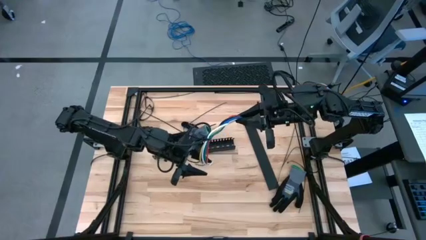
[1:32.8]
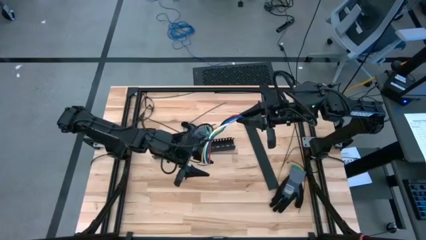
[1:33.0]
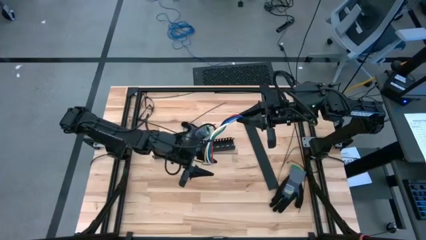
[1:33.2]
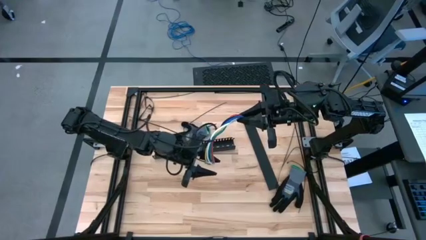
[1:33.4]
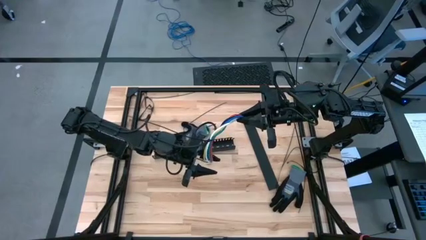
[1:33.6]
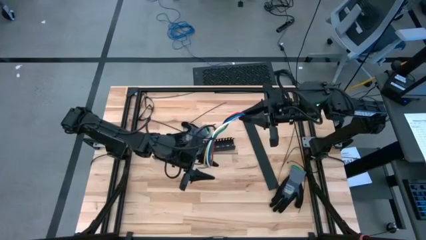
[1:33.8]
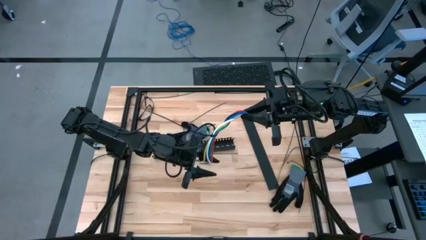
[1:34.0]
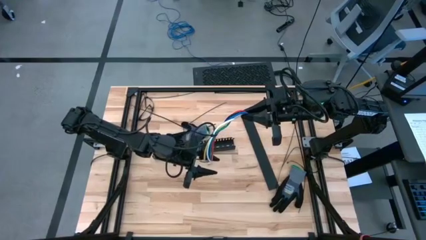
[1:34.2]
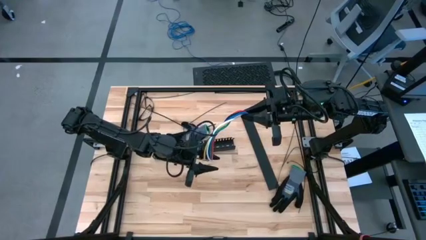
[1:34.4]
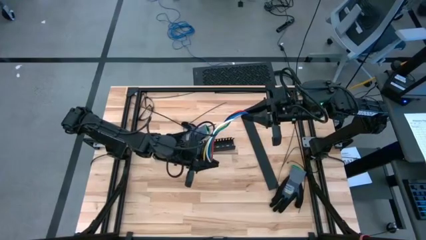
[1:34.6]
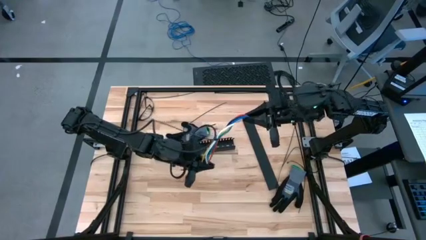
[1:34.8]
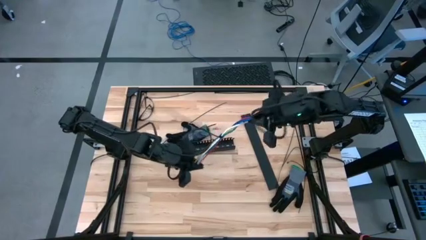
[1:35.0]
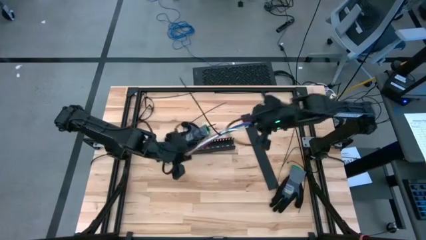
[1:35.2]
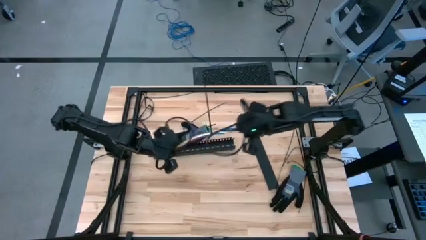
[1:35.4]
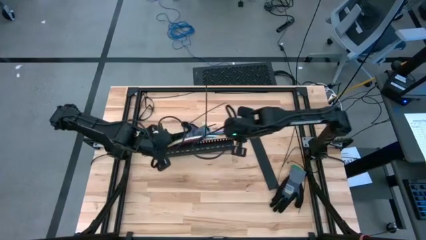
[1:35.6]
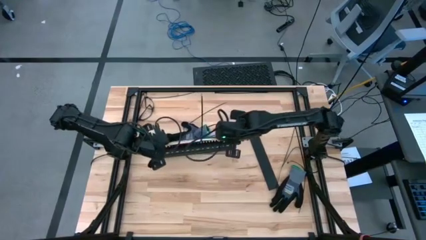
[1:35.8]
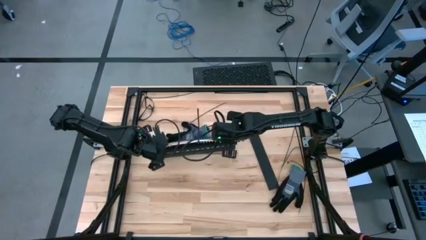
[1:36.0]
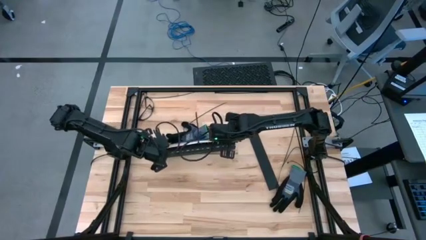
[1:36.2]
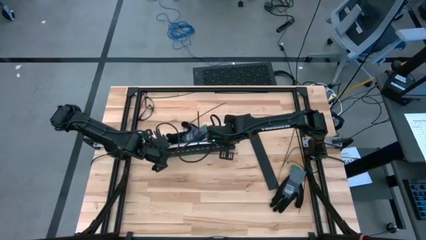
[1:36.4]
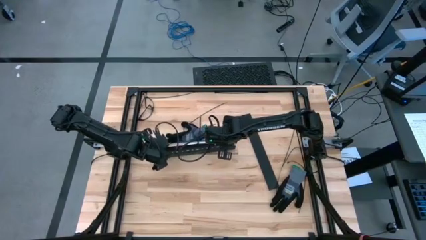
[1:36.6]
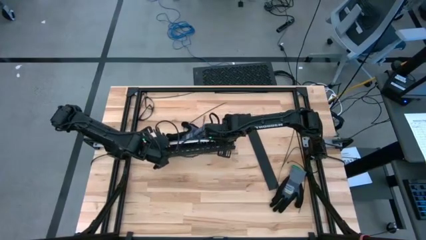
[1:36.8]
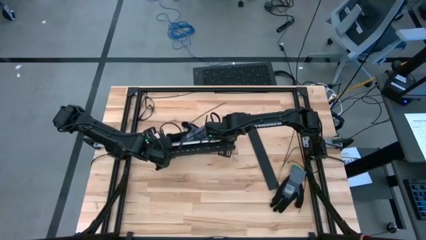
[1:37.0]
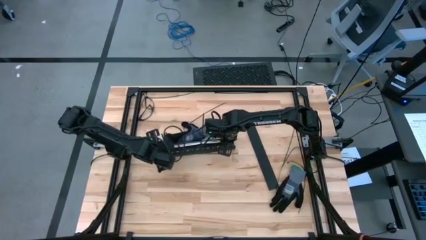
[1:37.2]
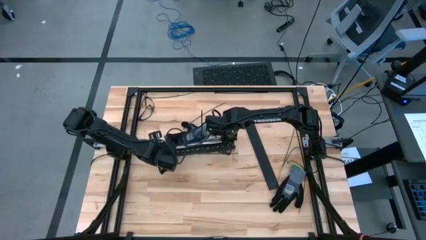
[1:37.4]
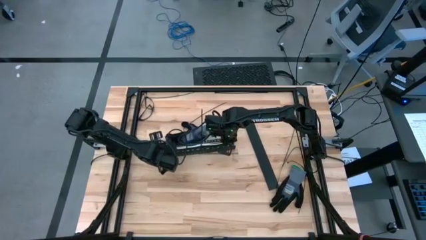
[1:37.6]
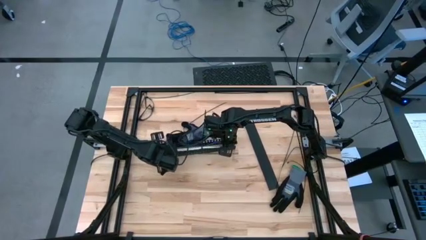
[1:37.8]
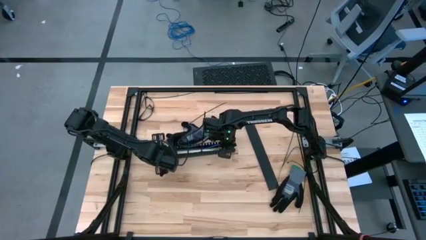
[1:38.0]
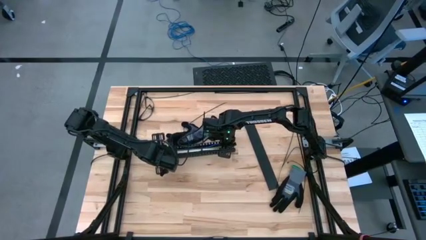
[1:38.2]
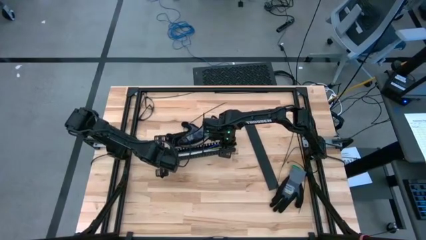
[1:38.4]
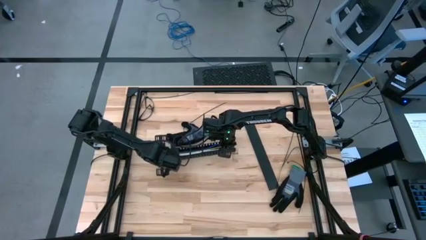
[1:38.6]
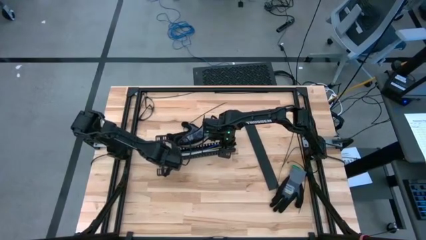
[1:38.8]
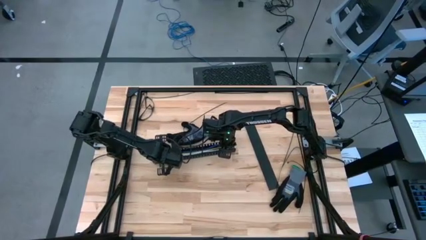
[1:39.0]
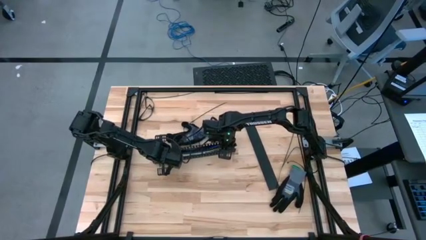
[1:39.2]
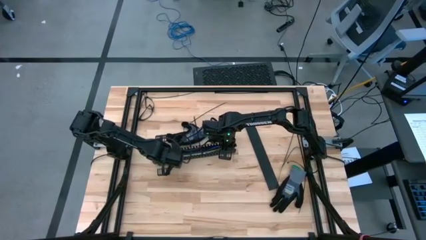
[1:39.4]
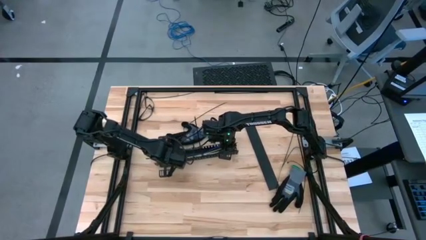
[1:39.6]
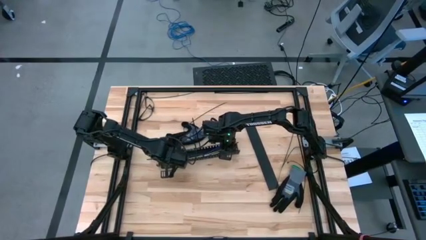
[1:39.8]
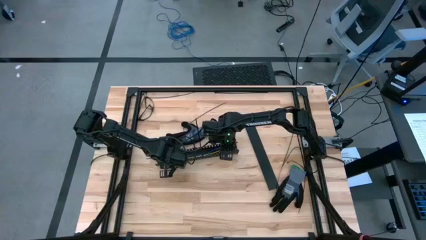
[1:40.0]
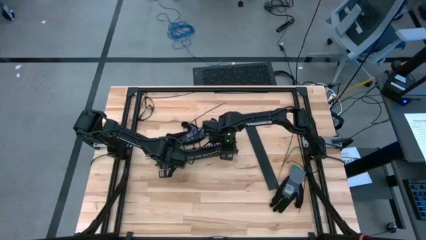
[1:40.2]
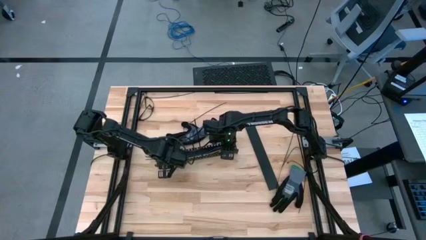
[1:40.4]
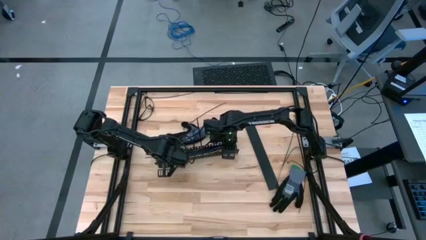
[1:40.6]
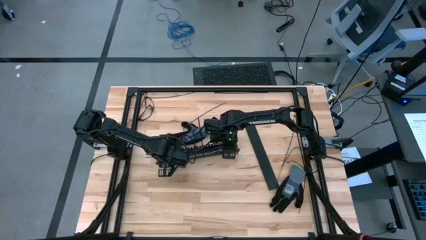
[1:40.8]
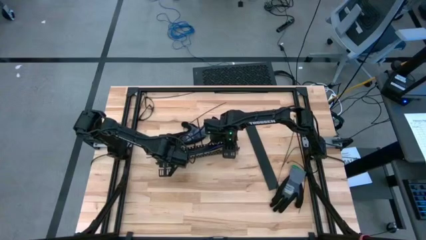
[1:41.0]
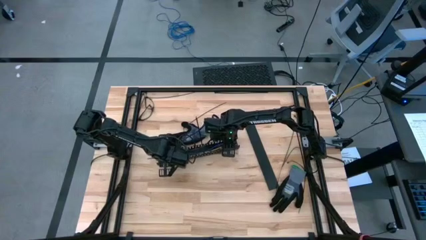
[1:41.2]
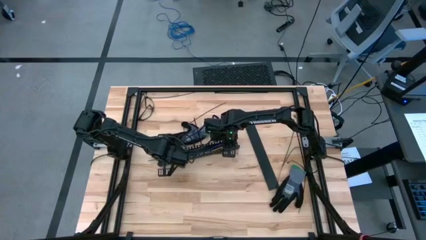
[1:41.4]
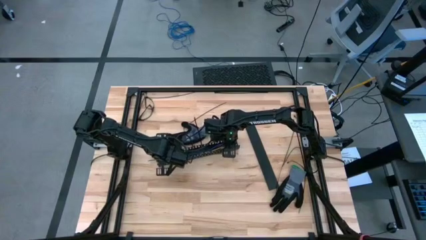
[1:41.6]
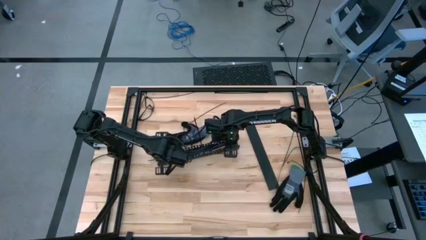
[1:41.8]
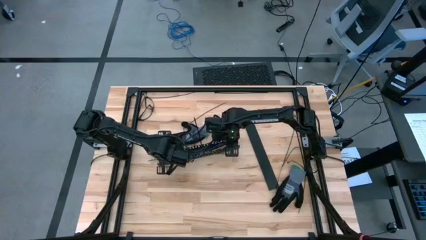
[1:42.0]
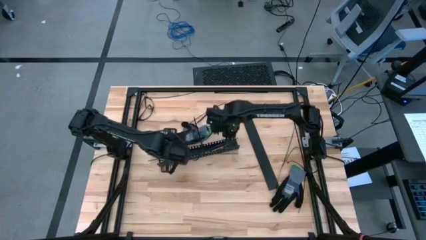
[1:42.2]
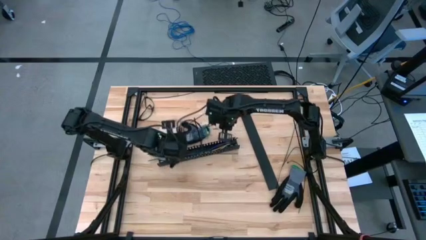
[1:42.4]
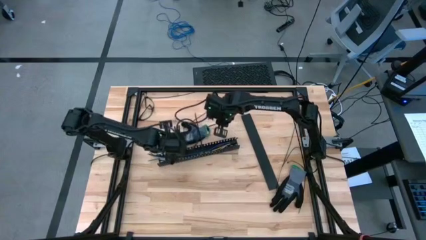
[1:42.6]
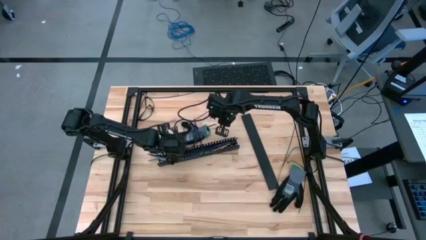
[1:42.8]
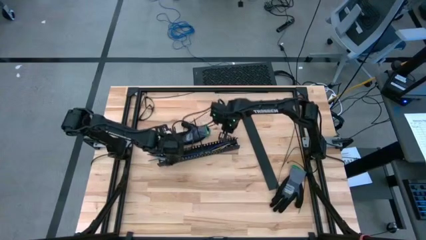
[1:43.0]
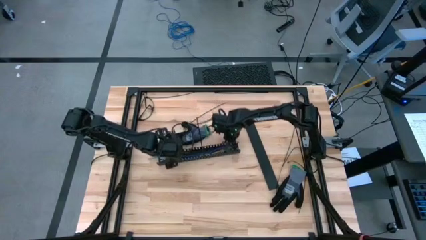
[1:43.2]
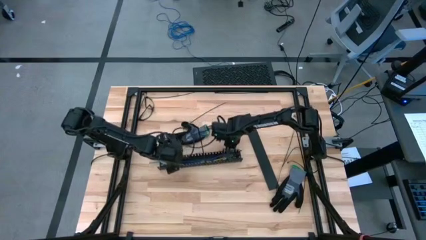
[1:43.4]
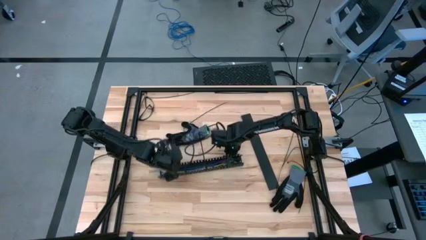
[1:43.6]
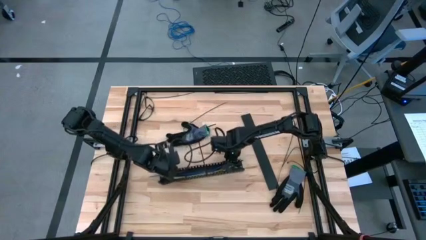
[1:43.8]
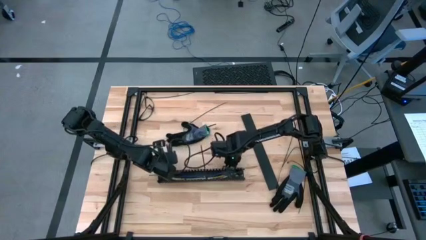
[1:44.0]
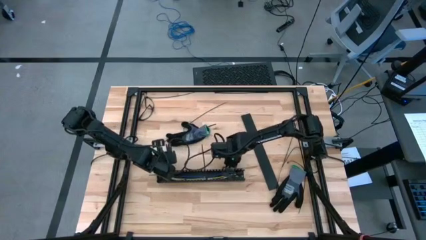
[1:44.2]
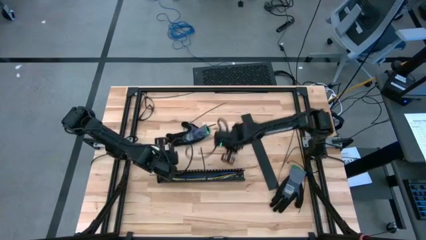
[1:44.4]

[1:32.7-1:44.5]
Task: Ziptie cables
Put the cable wires into the black cable duct

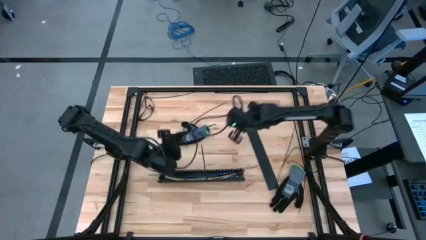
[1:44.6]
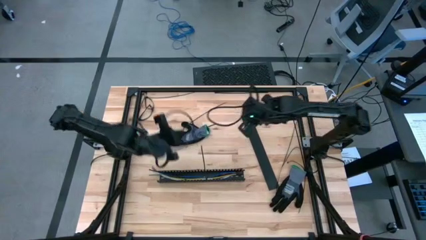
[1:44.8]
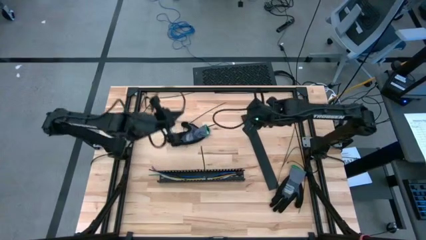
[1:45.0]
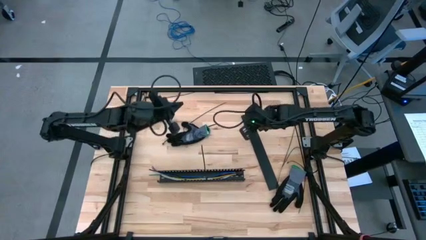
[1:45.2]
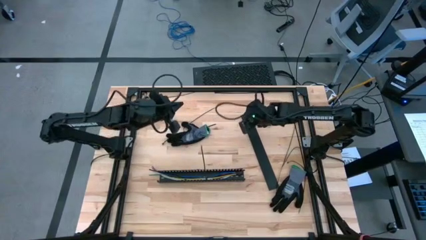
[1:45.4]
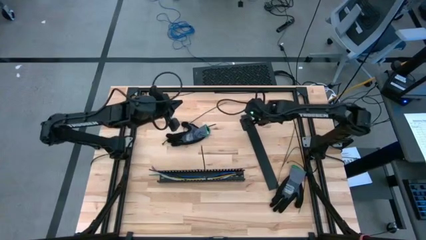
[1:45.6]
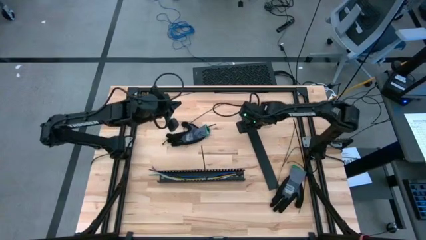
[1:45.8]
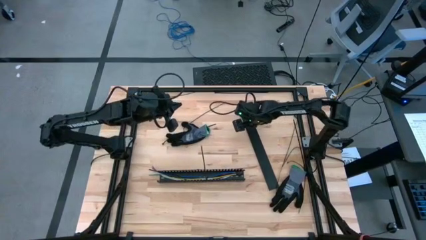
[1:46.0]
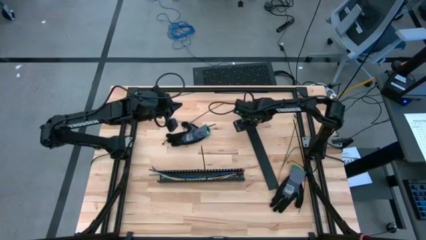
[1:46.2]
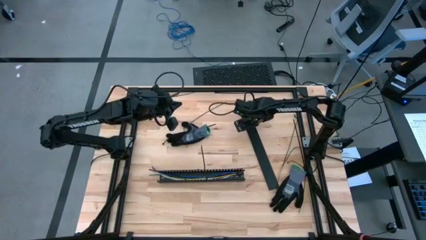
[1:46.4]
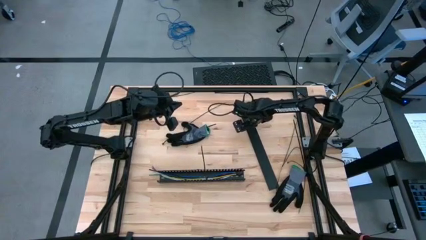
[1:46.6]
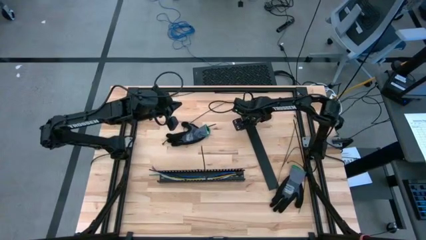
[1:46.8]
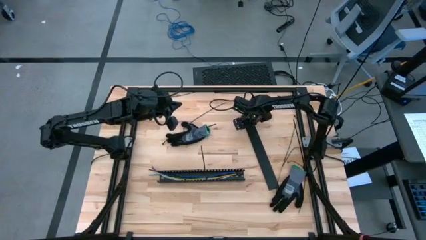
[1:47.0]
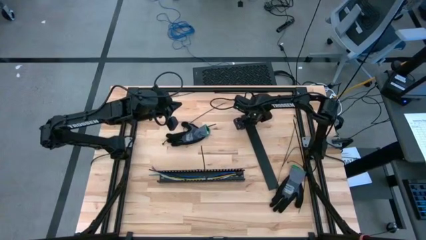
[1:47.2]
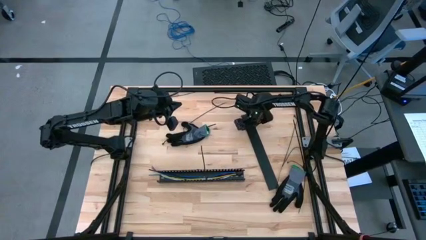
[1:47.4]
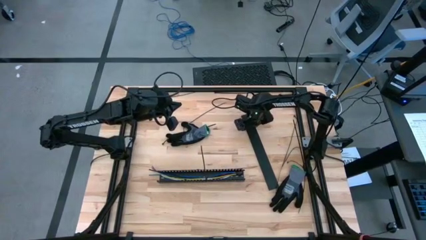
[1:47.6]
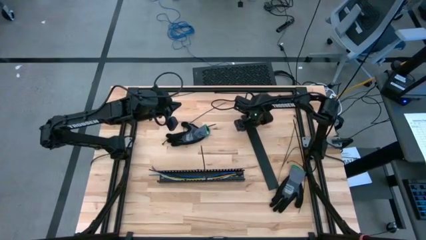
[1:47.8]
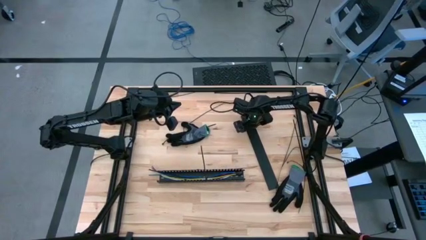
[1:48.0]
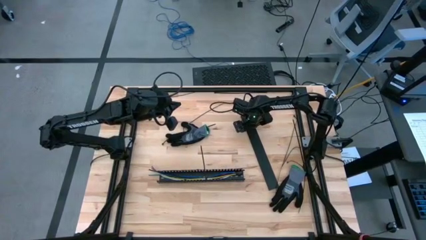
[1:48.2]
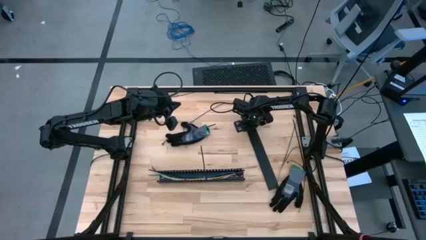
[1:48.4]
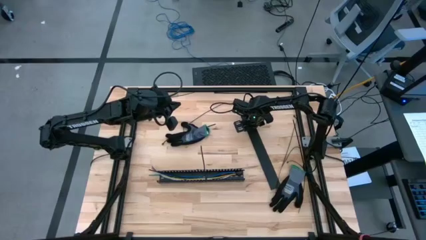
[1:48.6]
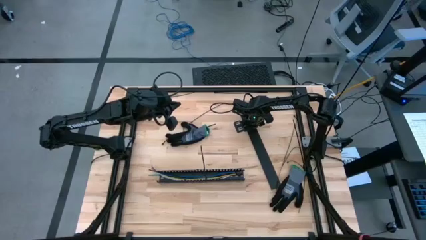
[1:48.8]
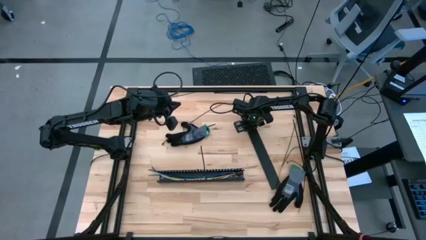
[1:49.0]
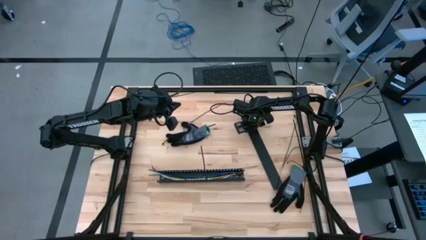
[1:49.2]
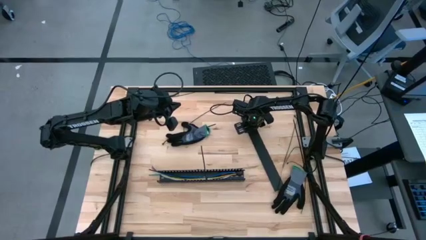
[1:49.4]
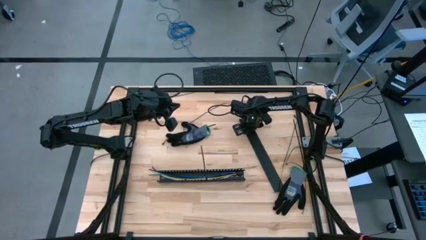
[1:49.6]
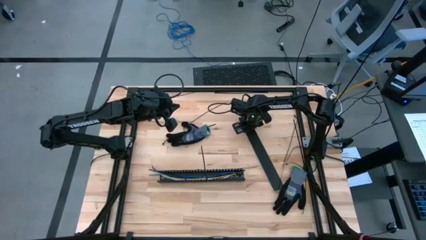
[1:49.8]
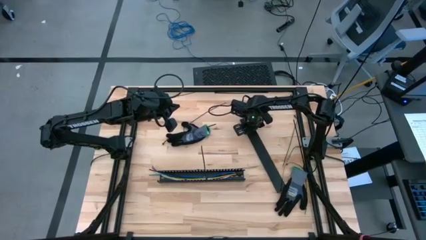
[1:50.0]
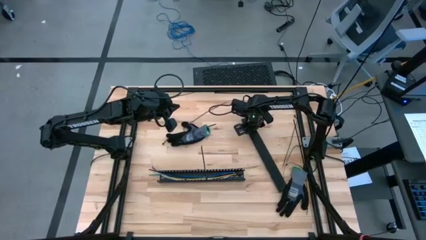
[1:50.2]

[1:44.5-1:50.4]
Close the black cable duct lid
